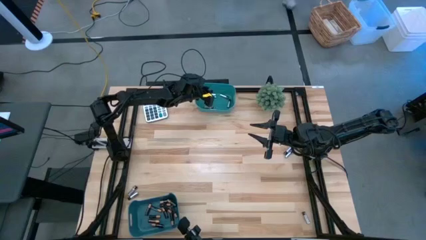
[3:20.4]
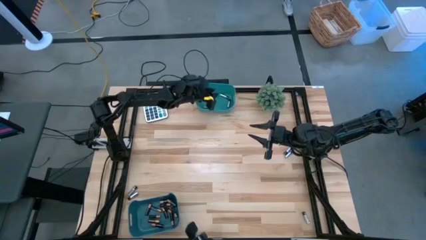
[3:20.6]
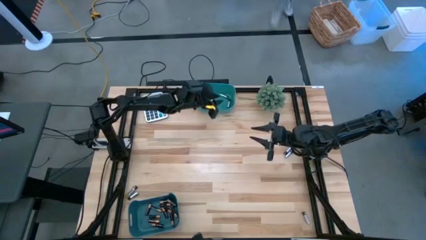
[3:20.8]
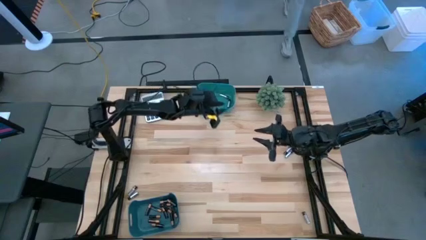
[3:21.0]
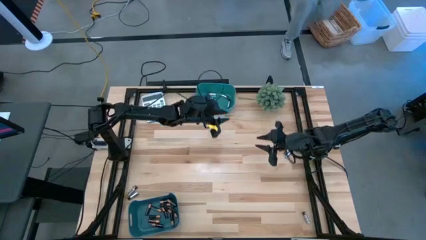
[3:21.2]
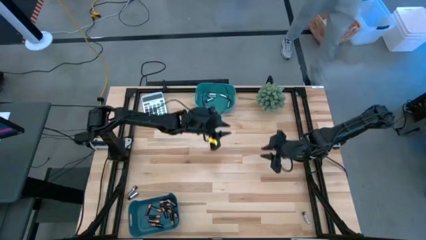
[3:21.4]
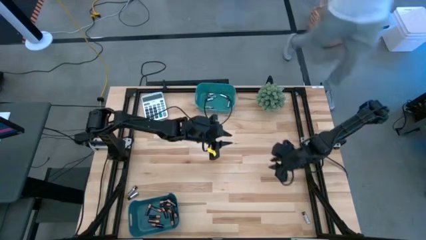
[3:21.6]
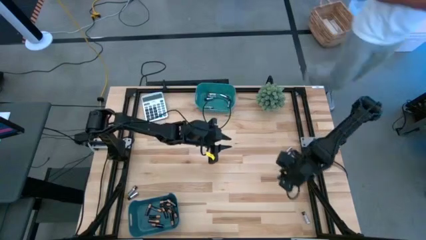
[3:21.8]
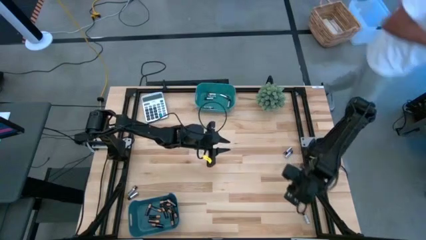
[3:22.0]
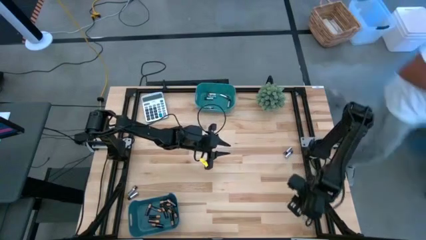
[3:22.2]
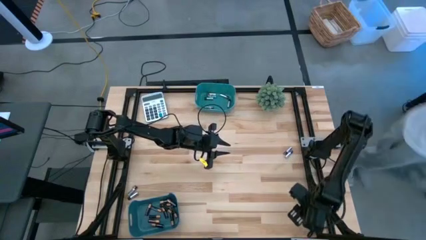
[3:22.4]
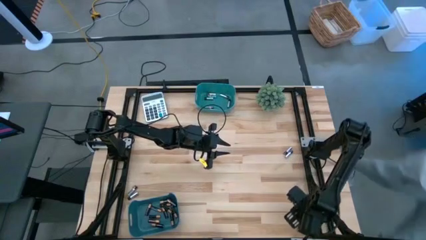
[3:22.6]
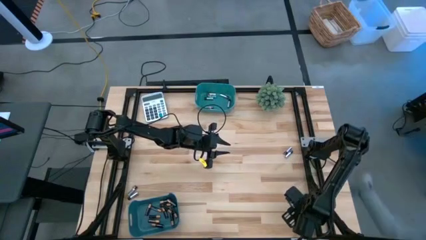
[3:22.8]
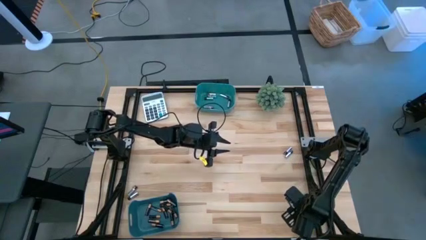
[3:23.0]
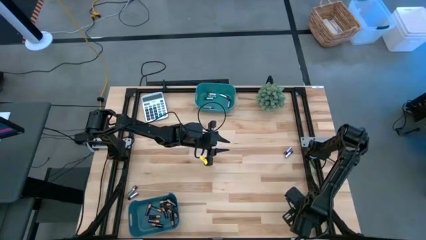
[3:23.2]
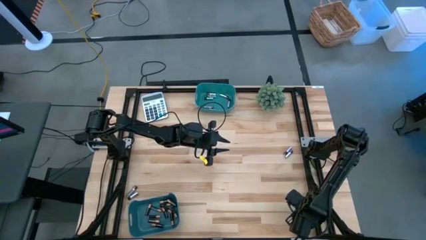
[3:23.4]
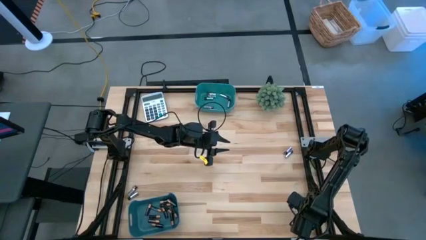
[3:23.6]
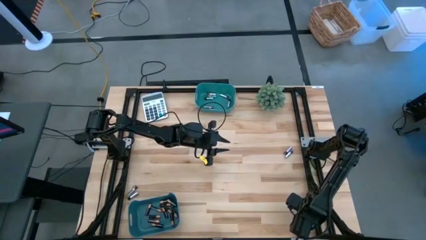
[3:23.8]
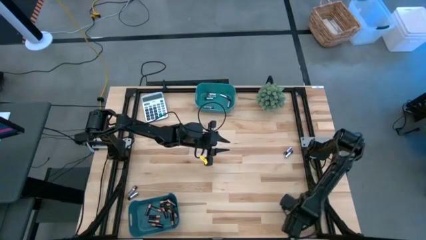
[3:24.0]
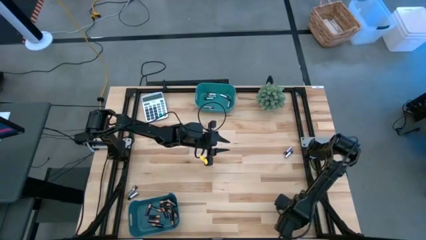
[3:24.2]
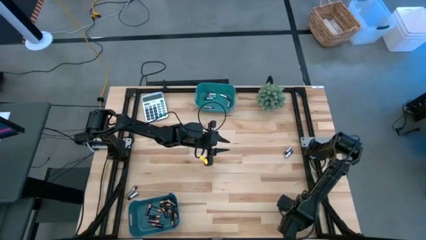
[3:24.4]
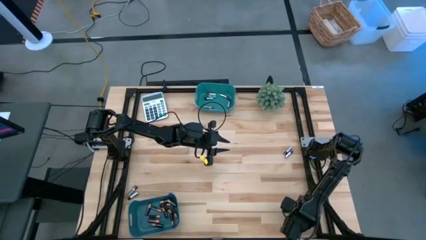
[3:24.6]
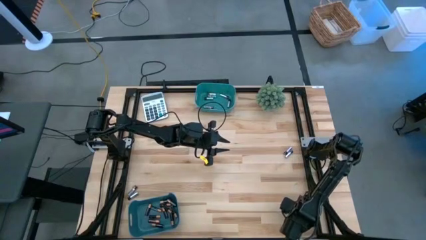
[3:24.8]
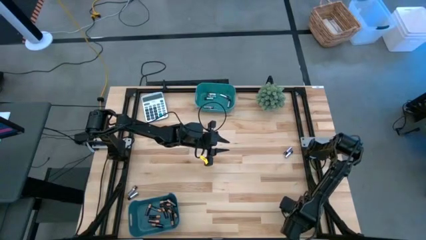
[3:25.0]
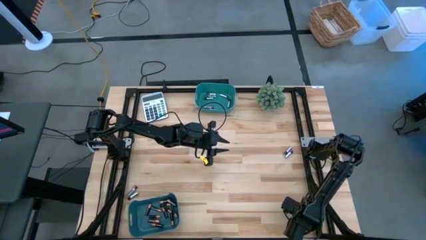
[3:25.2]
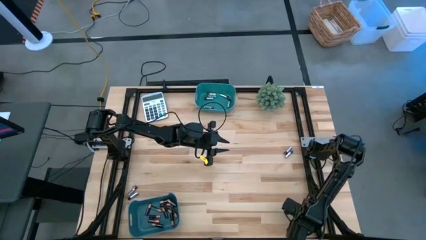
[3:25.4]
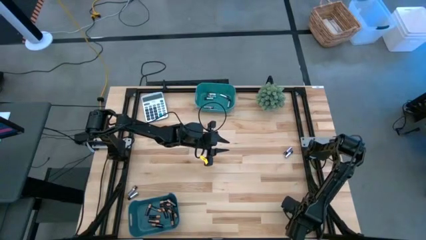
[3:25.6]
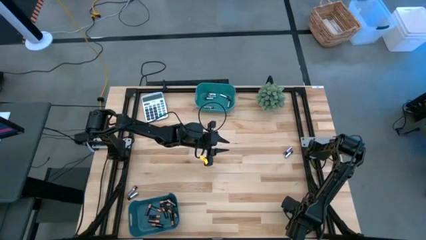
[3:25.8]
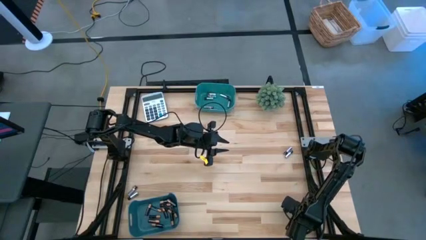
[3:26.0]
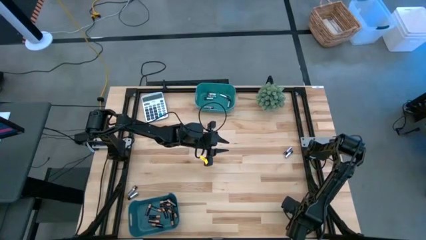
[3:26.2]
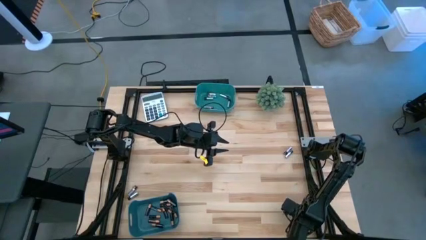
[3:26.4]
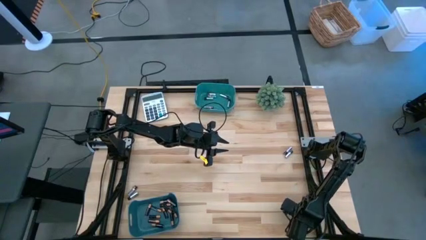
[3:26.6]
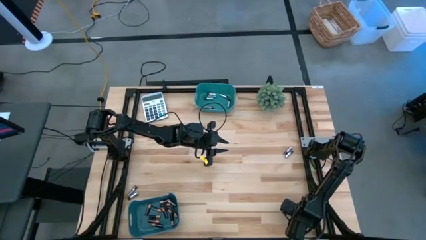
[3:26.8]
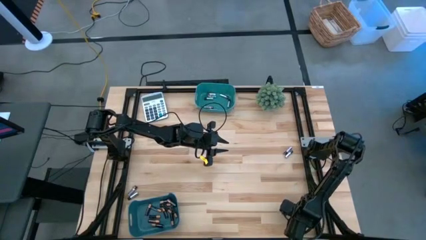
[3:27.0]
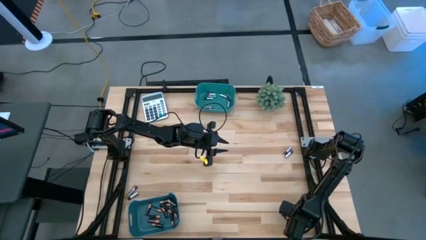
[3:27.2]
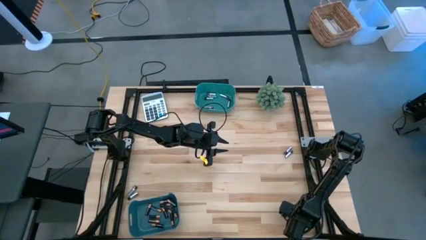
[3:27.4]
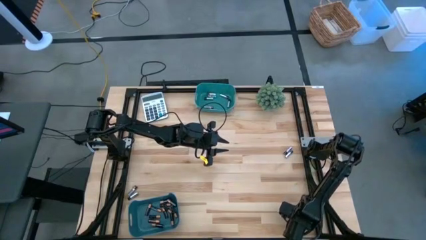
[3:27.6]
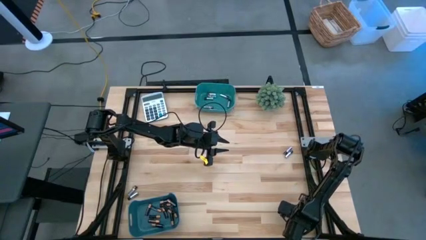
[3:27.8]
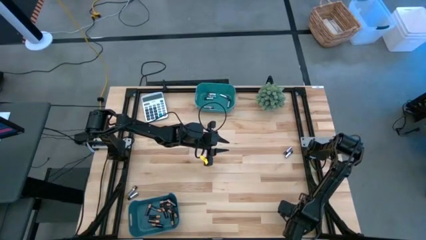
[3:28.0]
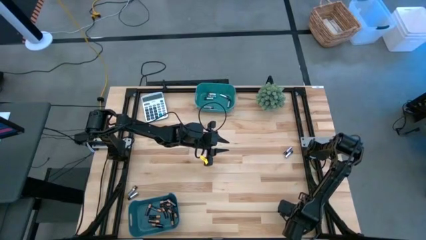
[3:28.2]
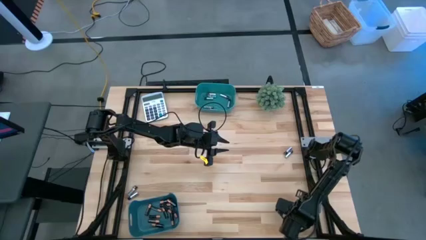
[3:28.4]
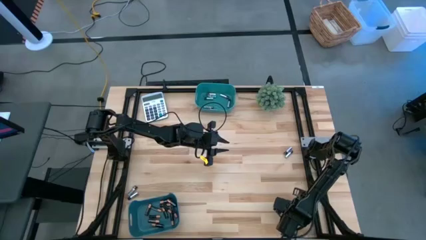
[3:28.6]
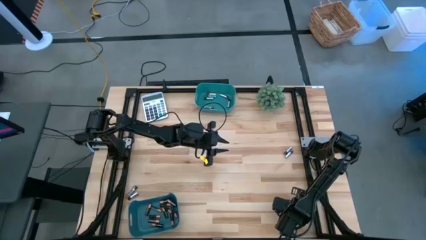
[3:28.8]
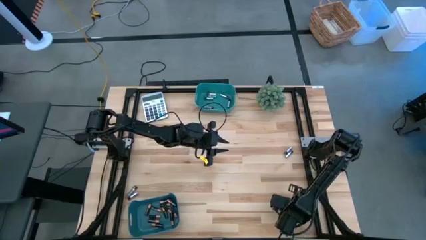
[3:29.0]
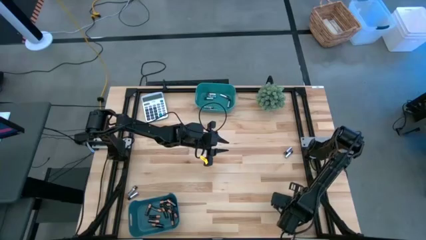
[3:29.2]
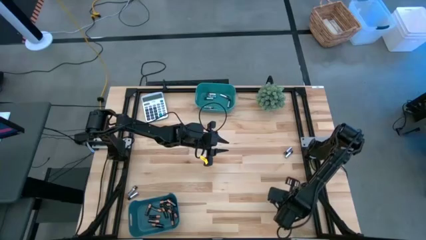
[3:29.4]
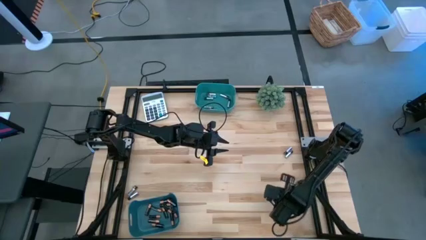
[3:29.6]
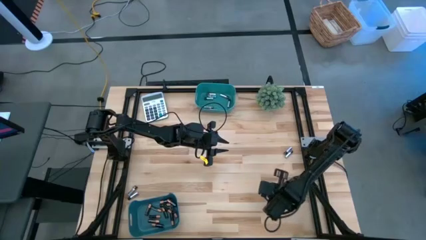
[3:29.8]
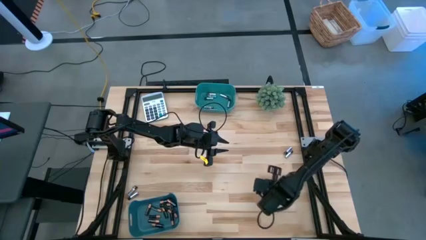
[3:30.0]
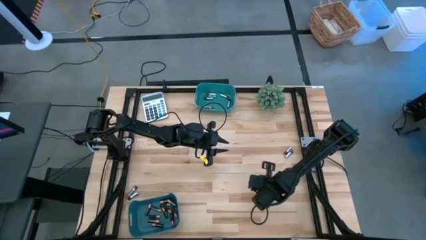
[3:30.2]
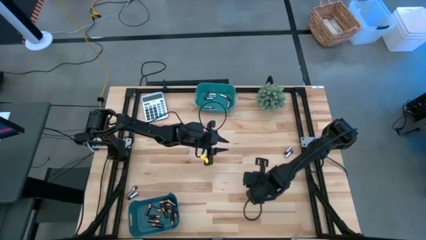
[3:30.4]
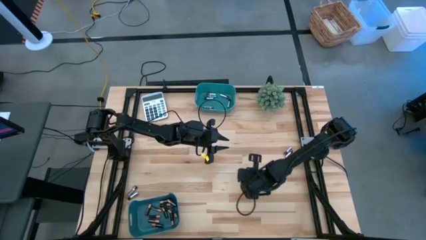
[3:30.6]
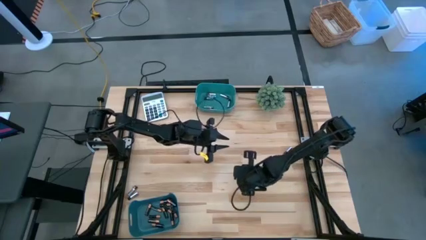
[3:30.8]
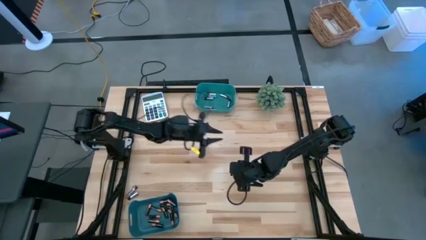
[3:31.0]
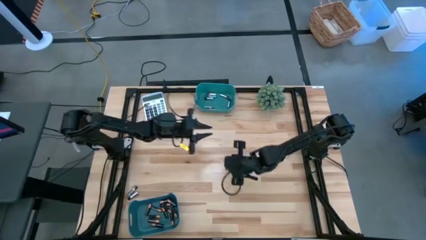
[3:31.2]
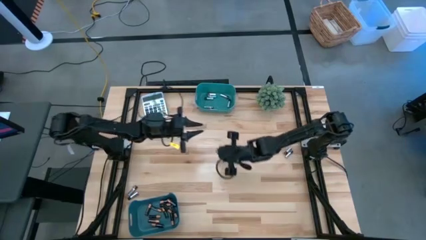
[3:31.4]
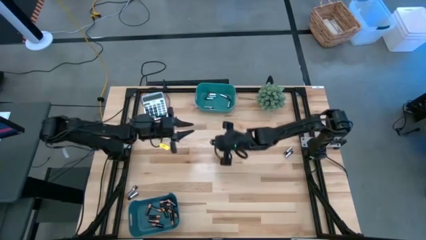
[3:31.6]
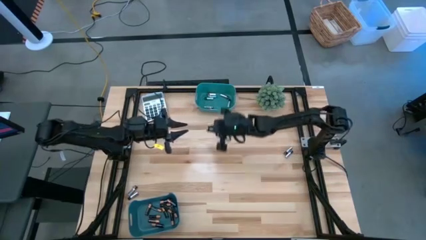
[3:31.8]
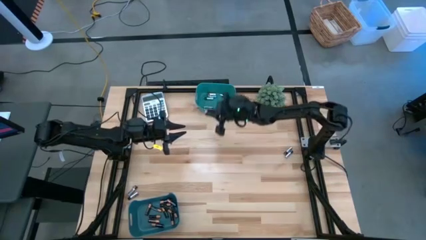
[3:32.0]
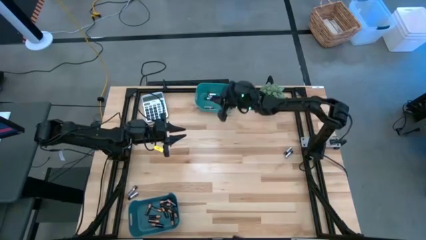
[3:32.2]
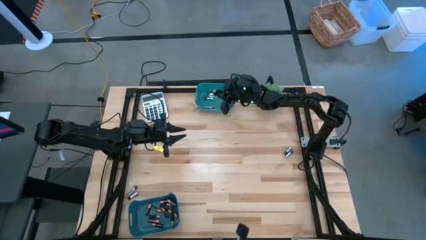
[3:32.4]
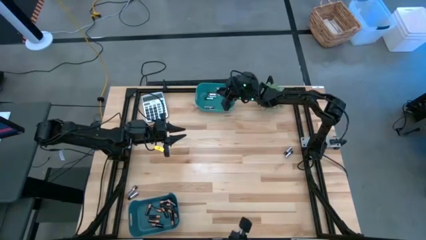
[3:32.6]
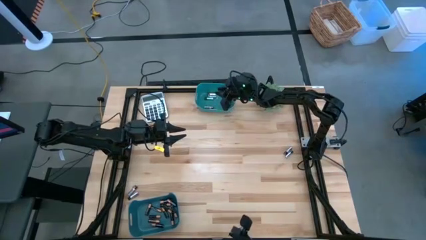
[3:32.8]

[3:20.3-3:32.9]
Task: Sort batteries
Put the silver battery into the top green bin

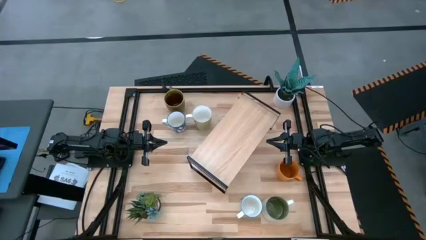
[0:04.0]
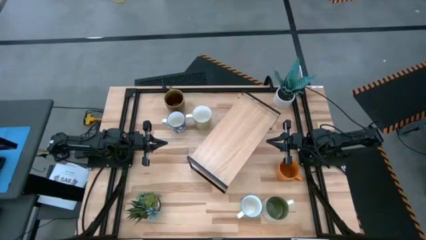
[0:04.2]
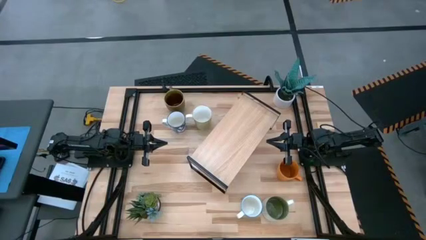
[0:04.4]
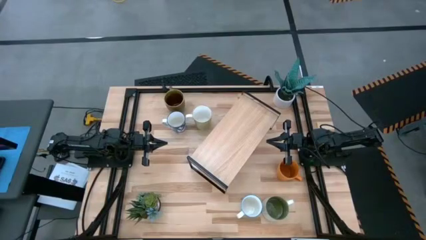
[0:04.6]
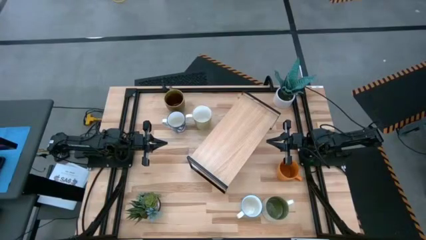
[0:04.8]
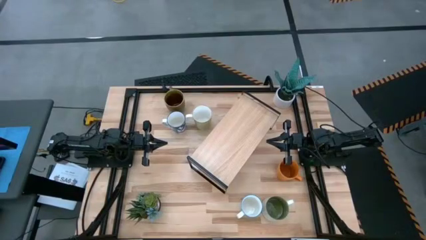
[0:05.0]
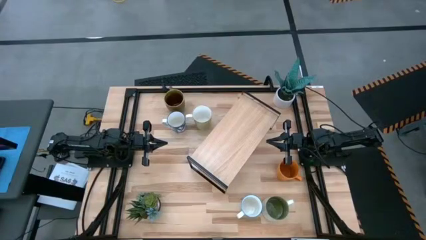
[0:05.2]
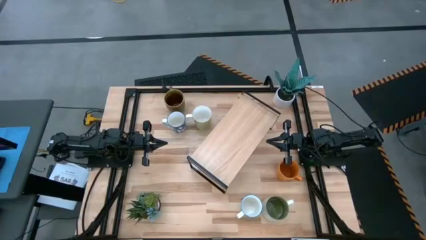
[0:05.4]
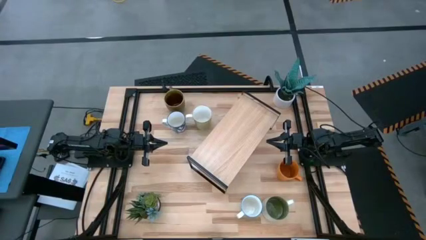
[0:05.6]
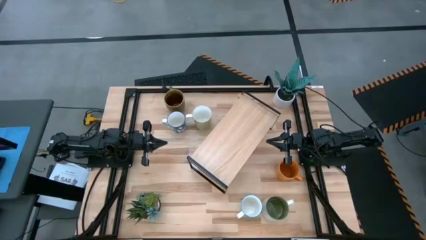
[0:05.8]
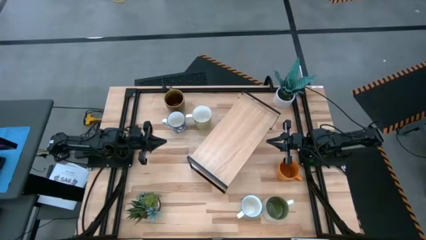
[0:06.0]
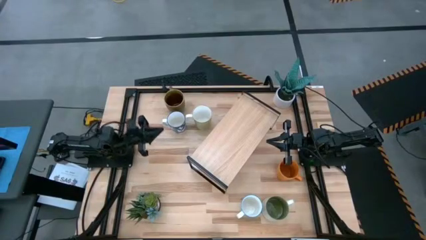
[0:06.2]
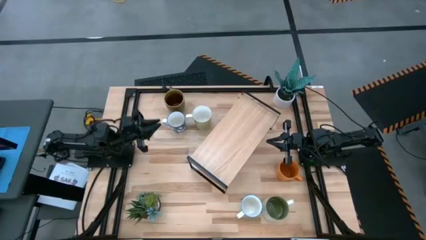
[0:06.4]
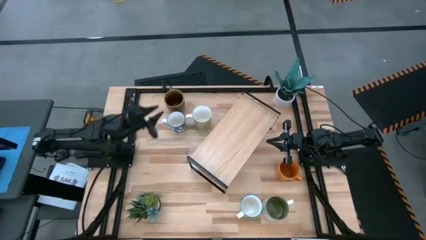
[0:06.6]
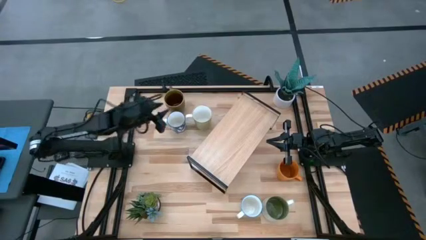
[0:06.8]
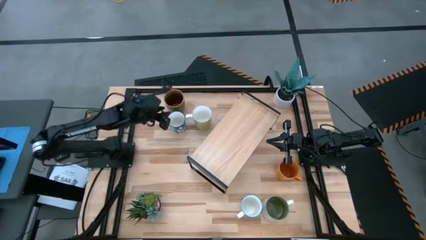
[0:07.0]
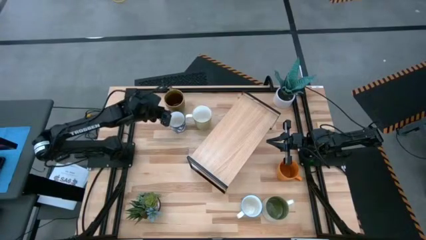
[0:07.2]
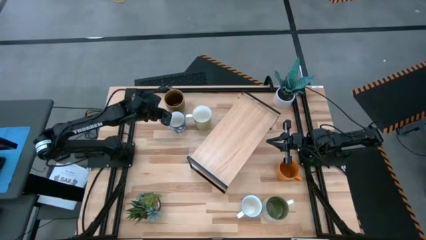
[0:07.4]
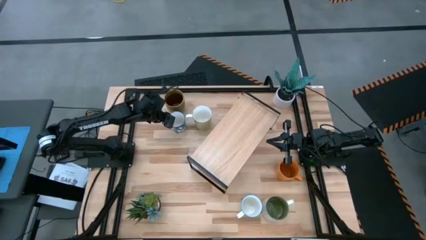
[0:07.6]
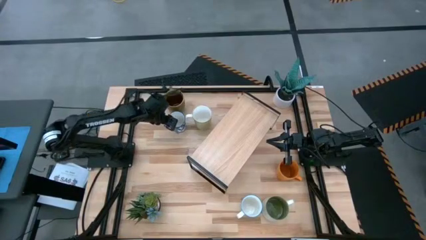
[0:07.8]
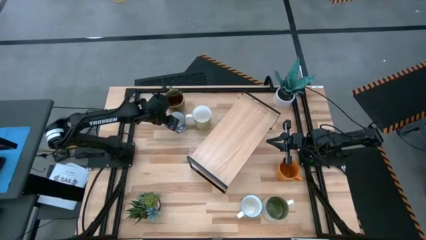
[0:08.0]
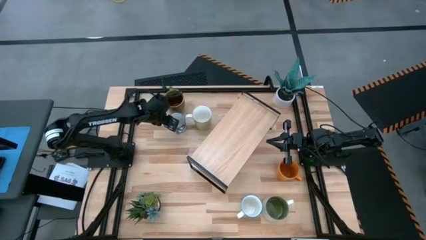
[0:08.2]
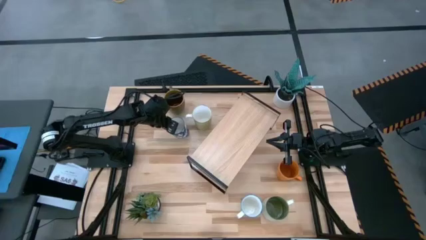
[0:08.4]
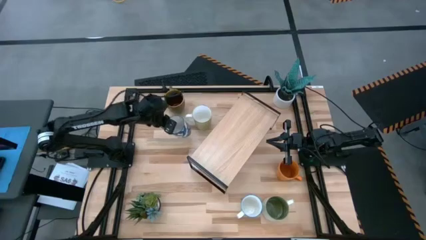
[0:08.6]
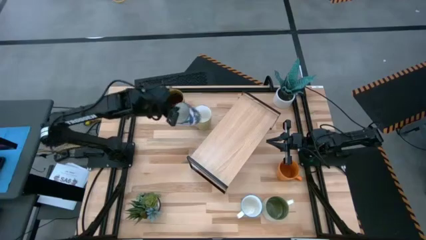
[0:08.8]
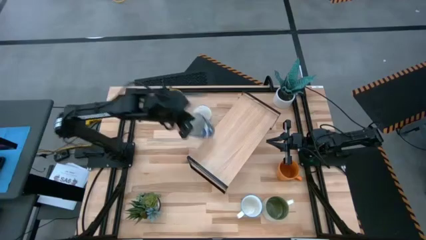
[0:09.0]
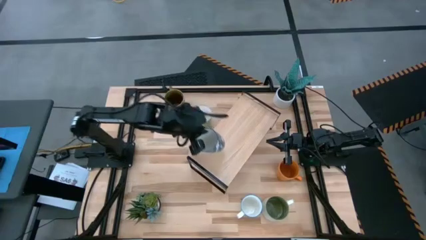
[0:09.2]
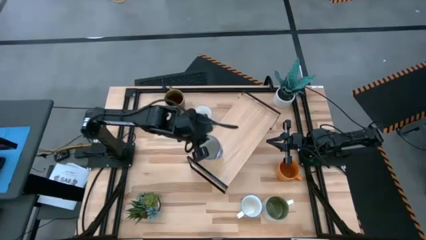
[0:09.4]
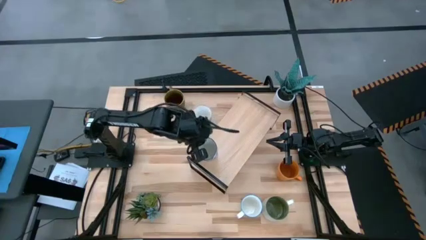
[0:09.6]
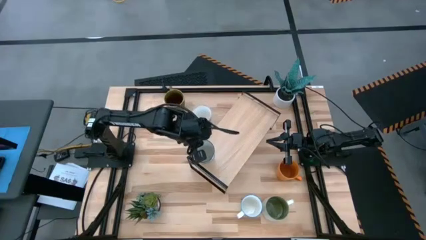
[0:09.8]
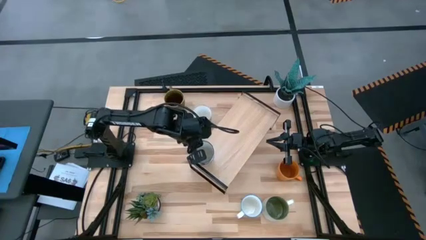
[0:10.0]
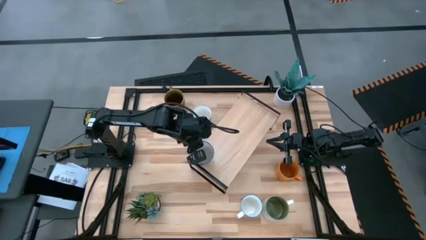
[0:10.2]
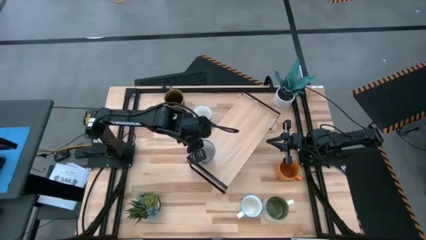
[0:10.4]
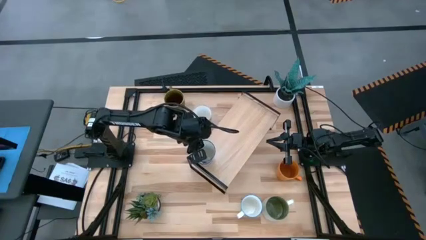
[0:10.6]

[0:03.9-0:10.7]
Task: Place coffee mugs
Put the blue patterned mug on the shelf
